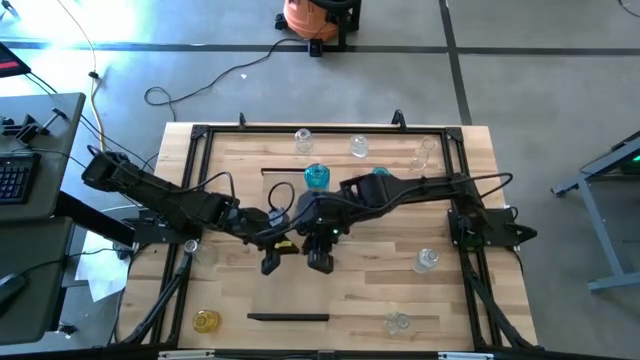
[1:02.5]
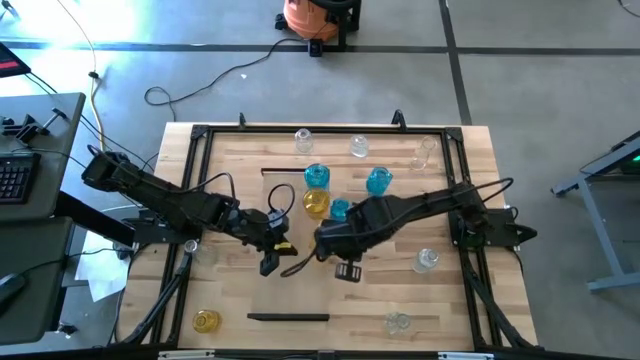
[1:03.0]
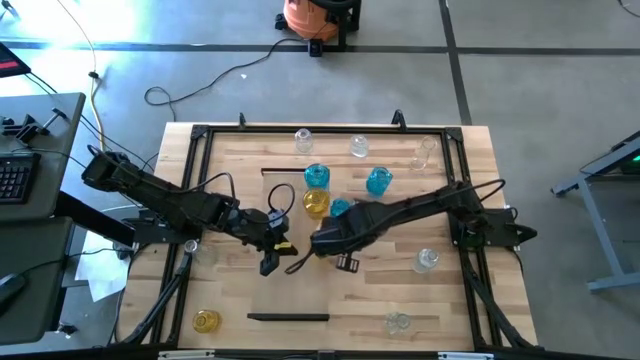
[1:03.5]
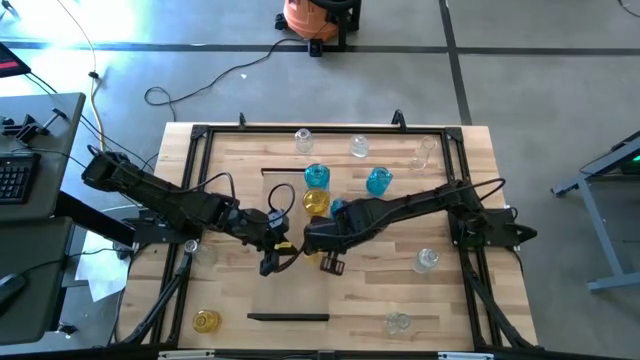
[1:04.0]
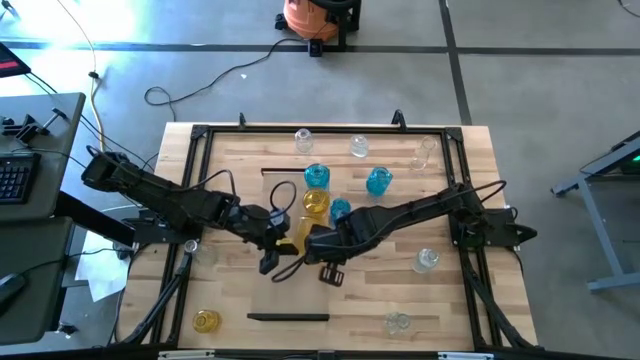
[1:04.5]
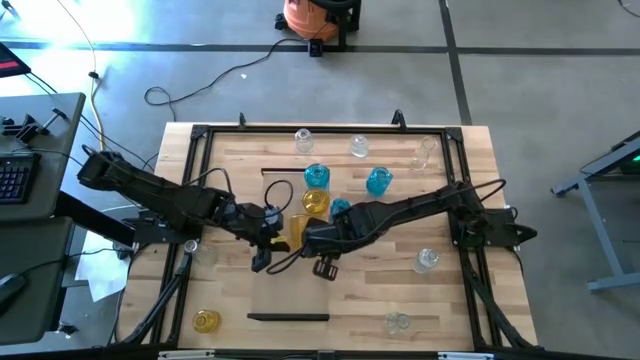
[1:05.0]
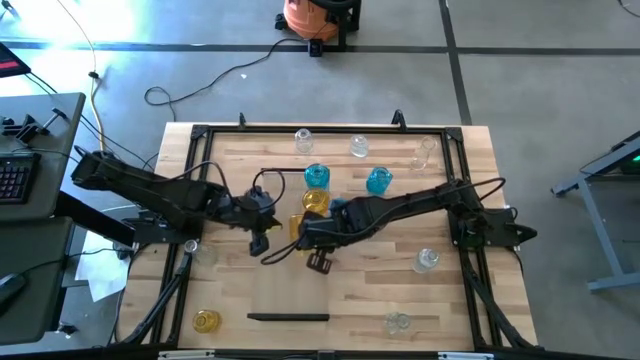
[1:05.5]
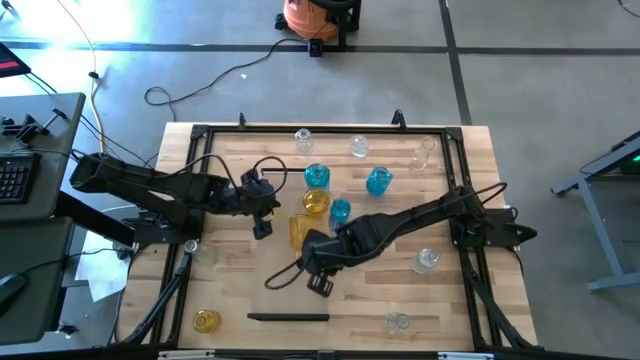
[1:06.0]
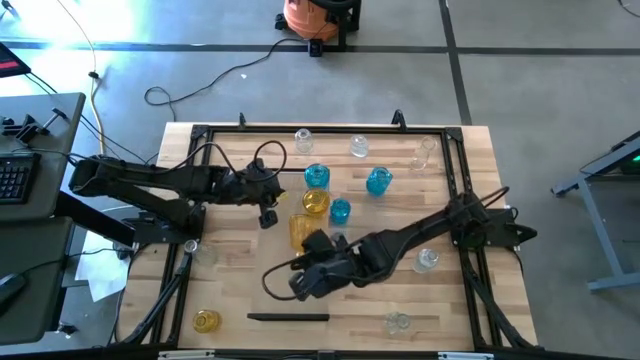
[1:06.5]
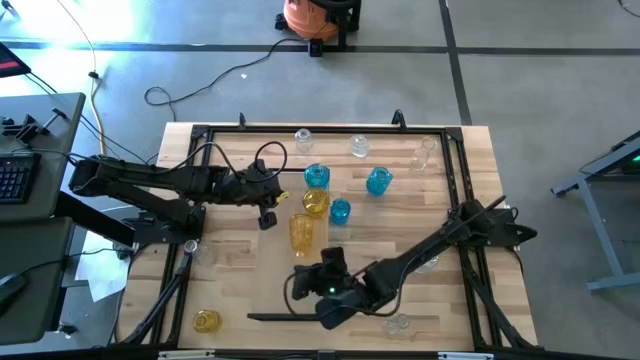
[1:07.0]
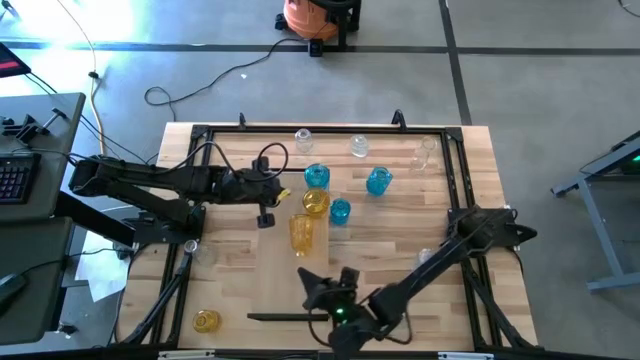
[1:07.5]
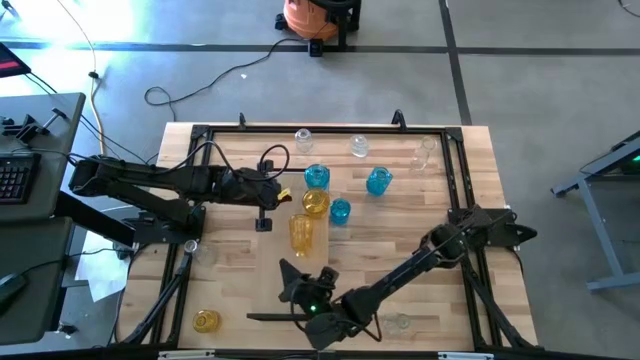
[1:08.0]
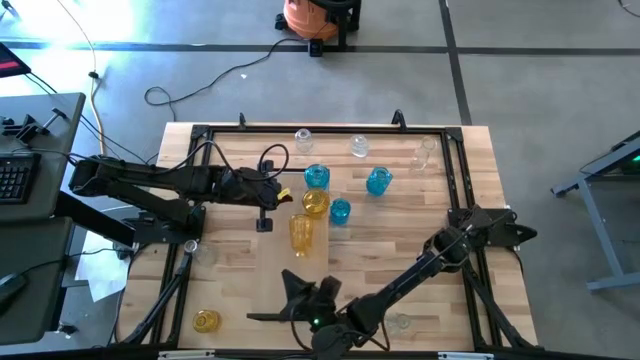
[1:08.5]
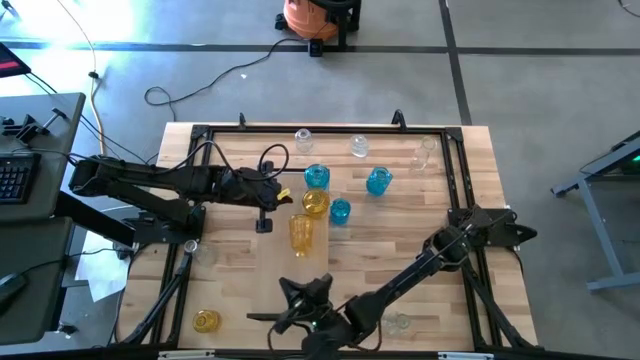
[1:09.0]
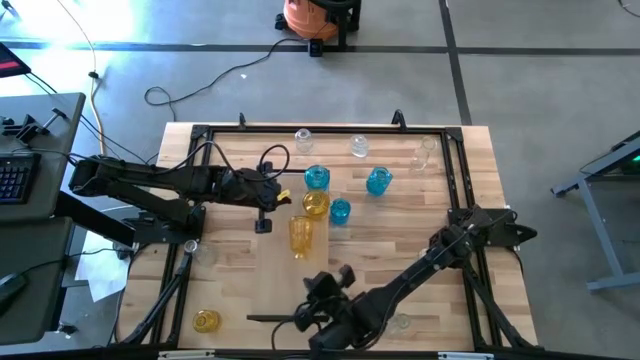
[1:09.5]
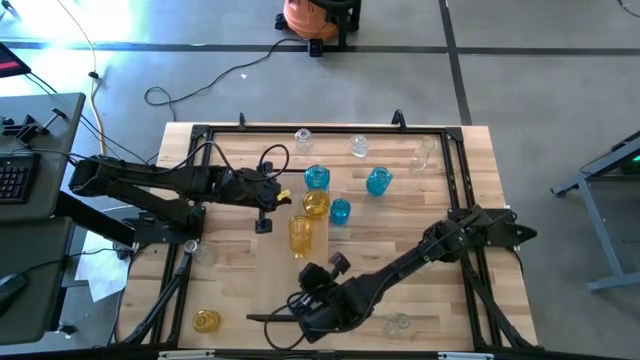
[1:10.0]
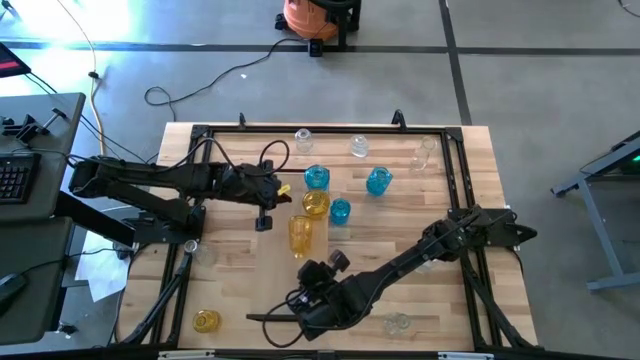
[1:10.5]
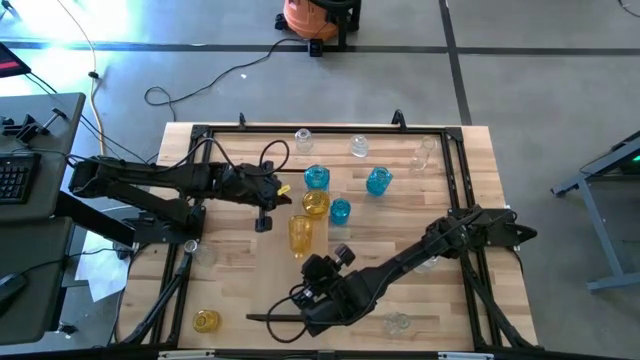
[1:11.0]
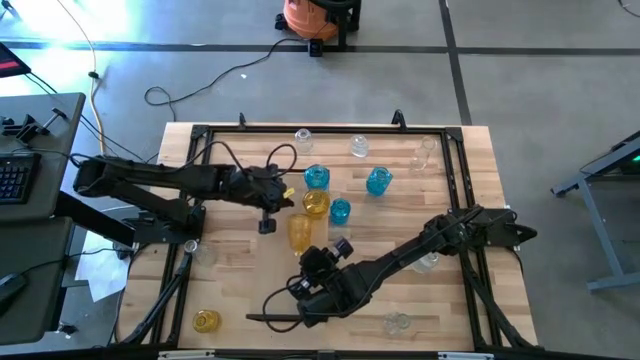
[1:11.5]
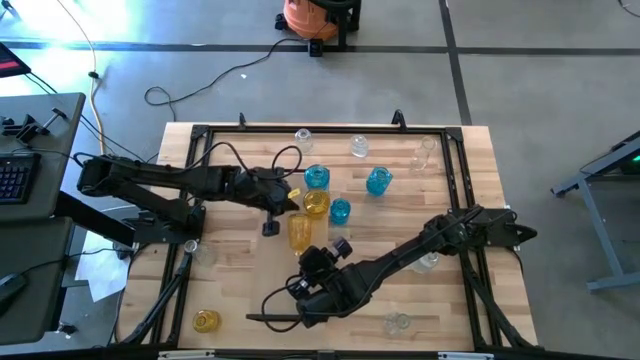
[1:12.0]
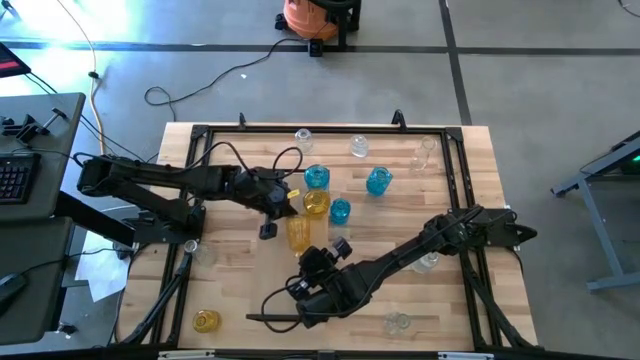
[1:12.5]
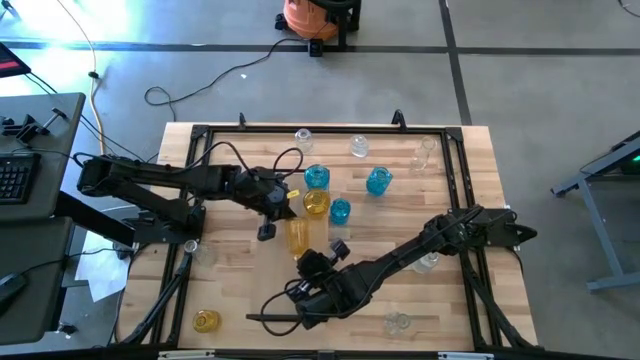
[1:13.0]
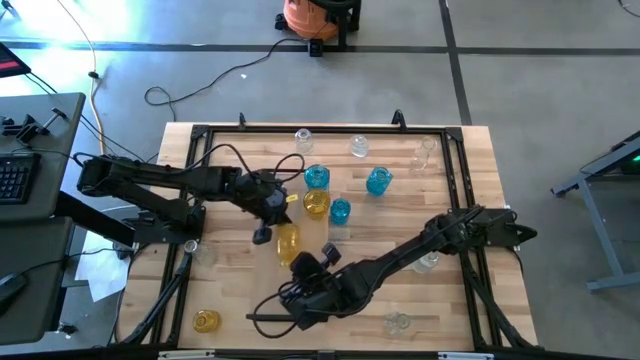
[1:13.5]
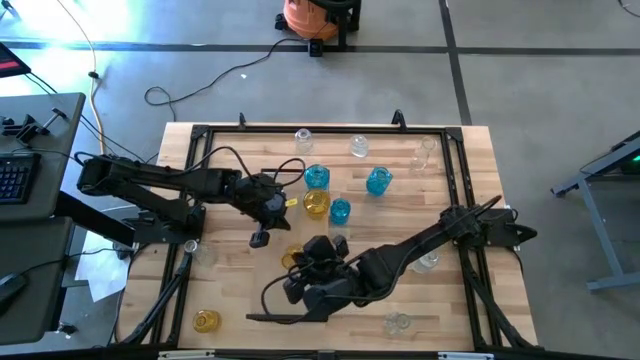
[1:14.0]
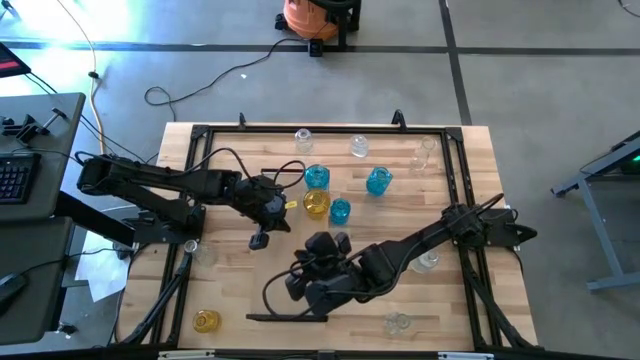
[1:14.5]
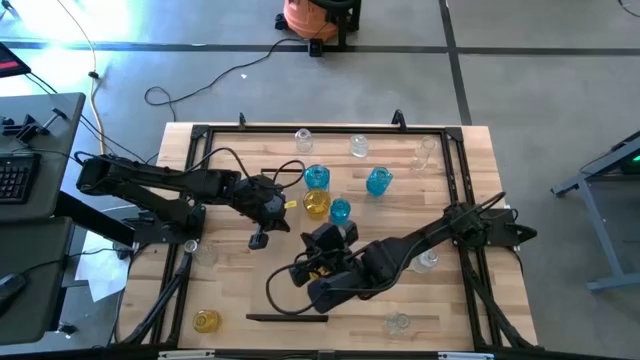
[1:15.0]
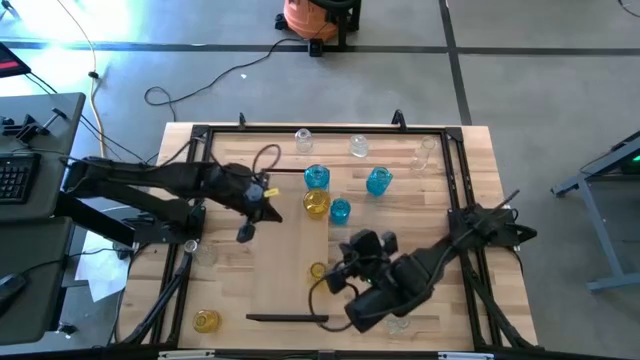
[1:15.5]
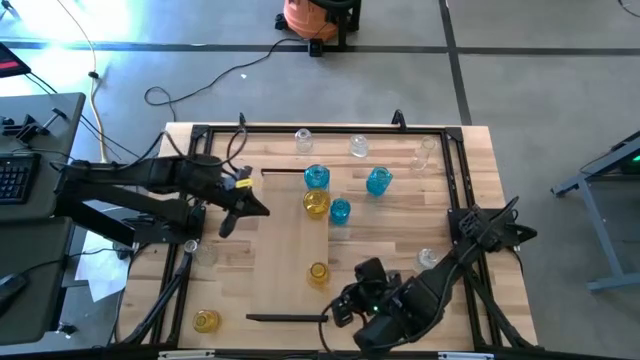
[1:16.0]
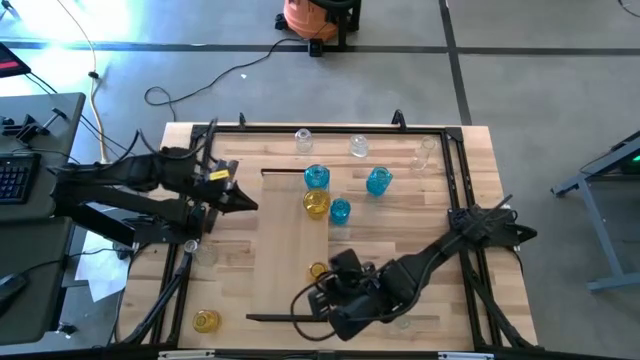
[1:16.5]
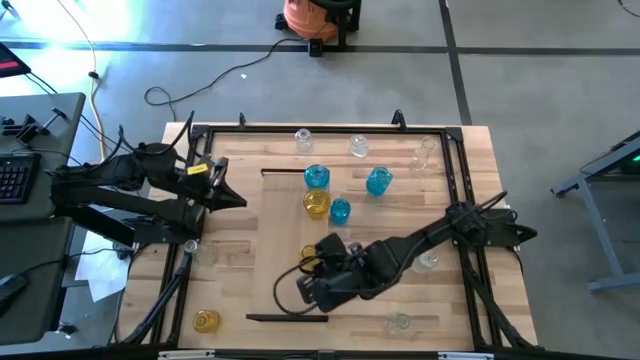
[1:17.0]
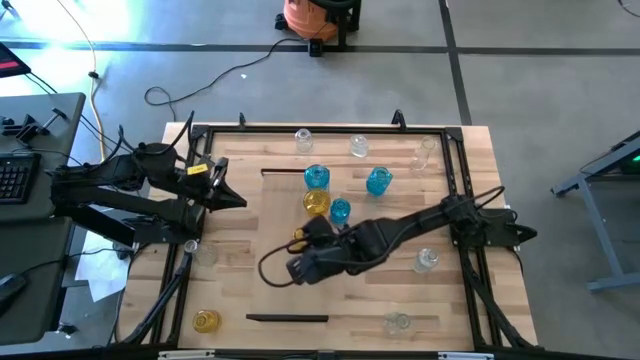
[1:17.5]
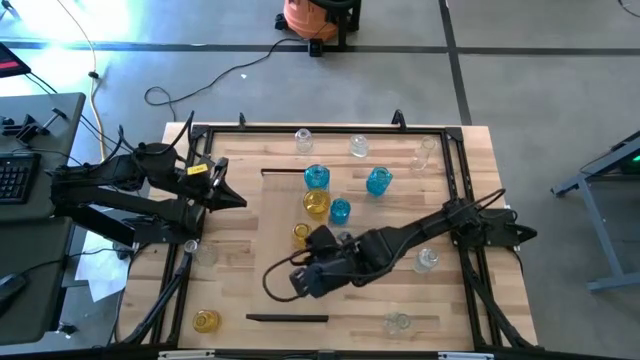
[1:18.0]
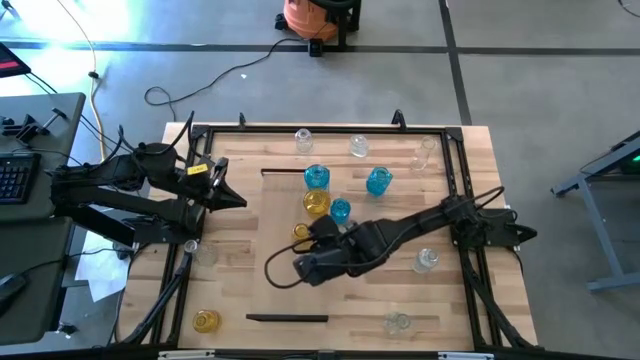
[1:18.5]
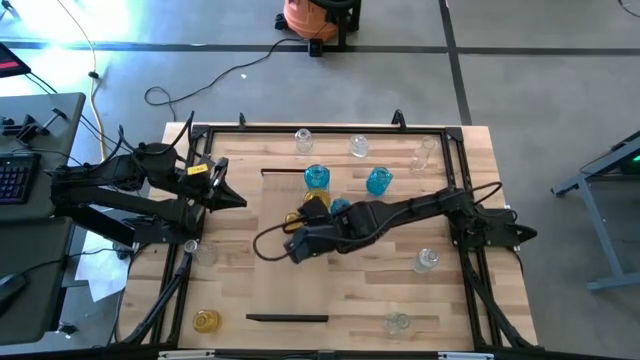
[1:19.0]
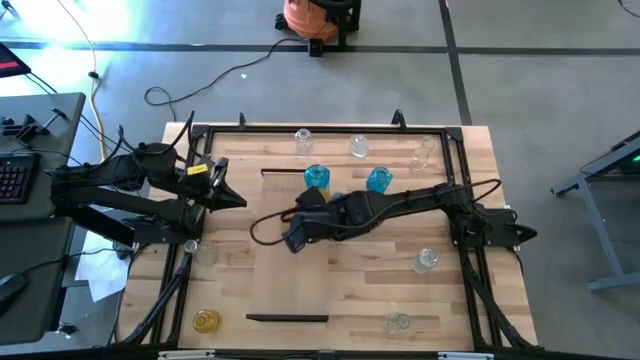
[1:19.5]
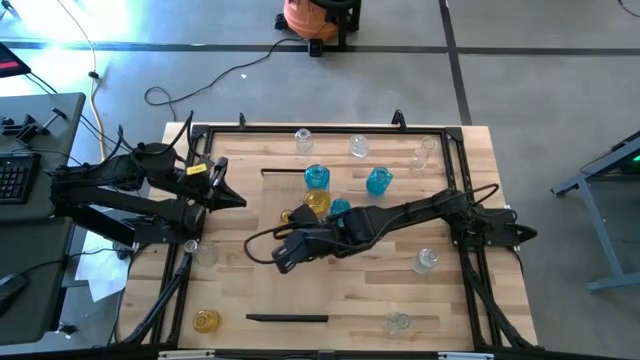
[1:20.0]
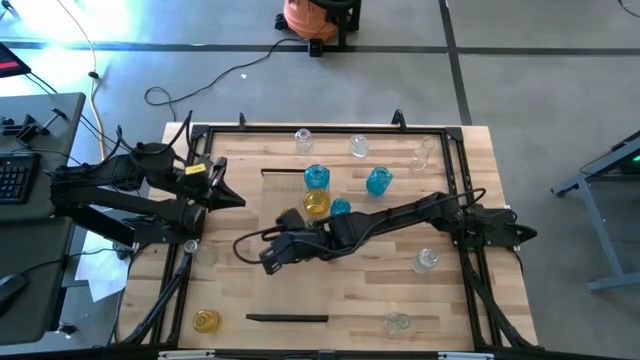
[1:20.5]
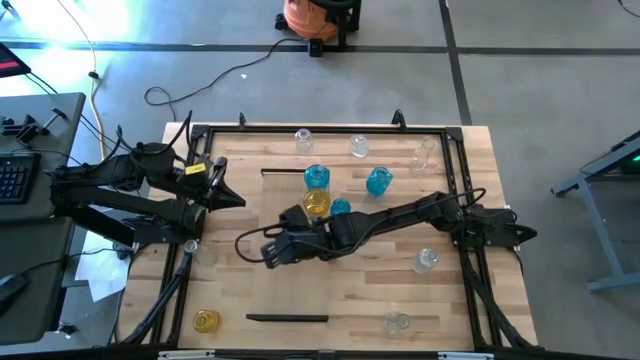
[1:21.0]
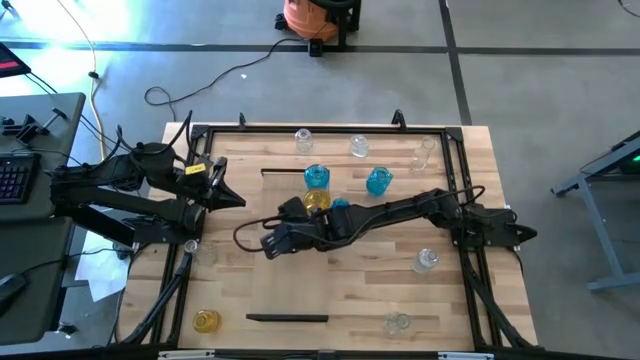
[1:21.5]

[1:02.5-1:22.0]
Task: sort vases onto shelf
Put the right yellow vase on the shelf to align with the other yellow vase

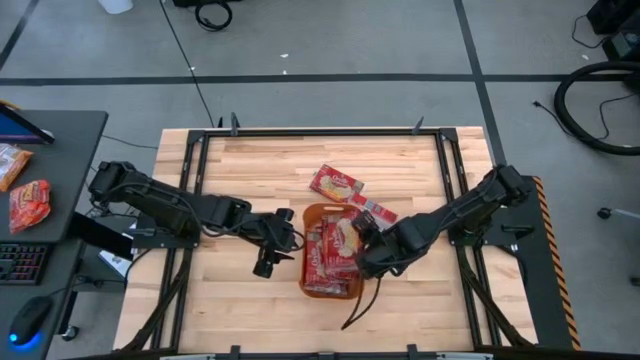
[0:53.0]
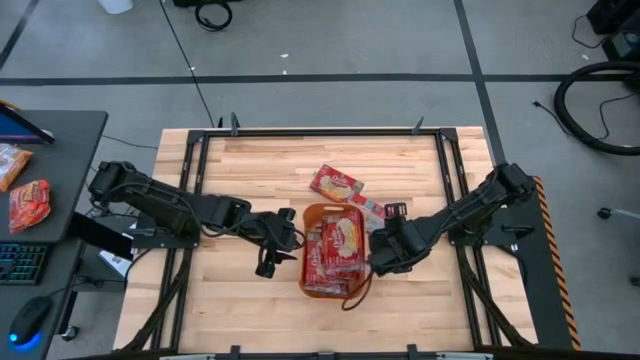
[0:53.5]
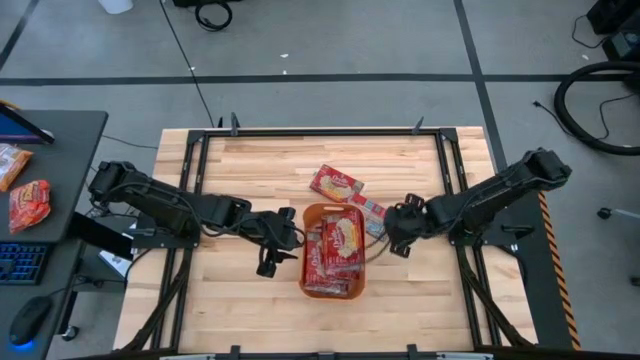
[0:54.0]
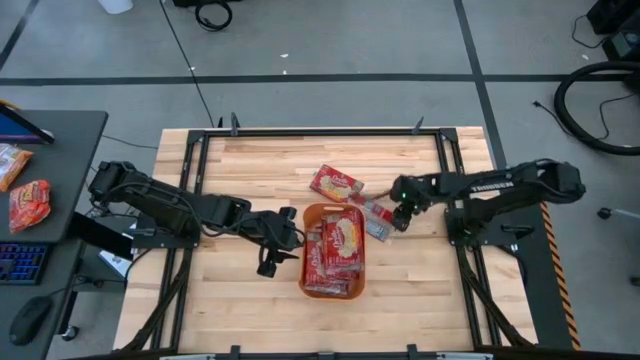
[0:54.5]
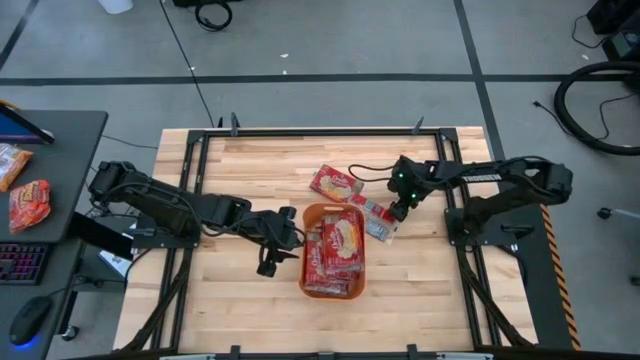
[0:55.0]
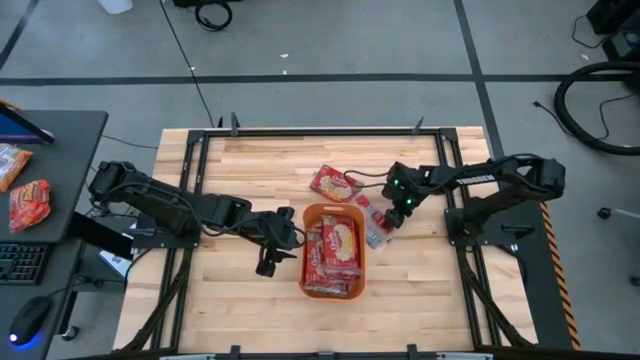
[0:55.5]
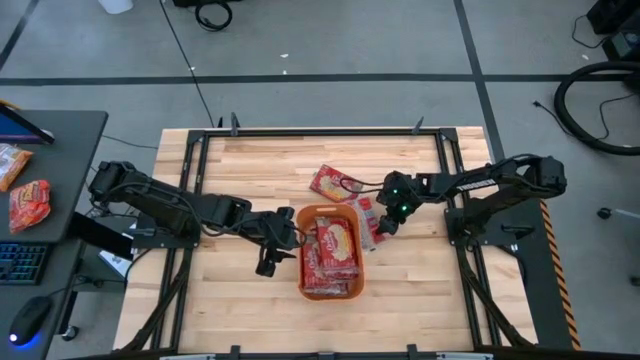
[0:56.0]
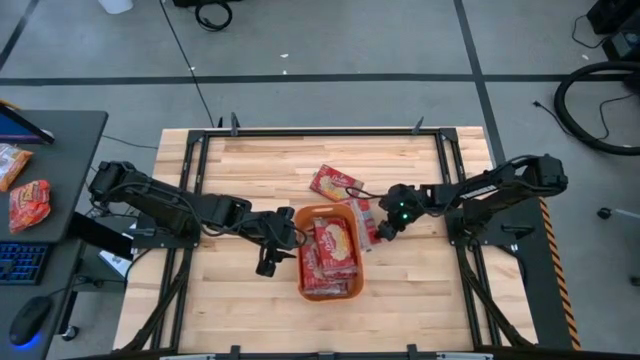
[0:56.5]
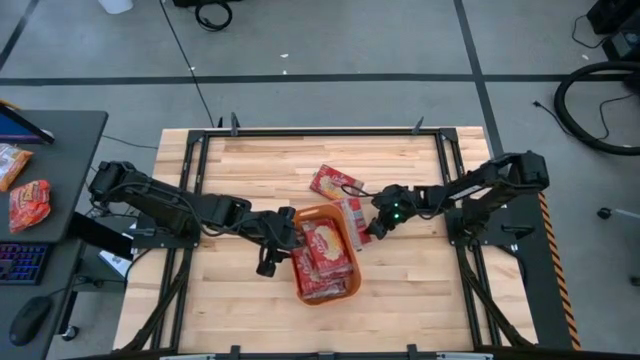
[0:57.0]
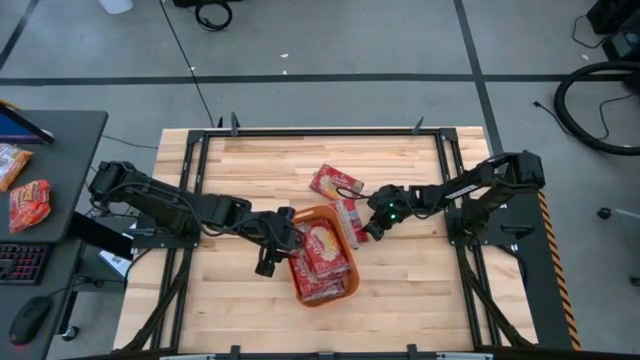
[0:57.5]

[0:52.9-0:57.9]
Task: Sort popcorn bags into baskets
Put the red popcorn bag into the orange bin
